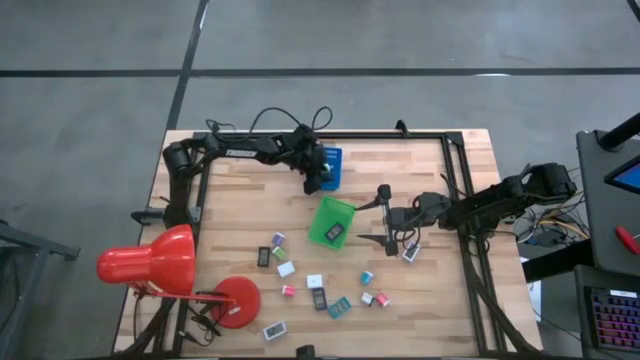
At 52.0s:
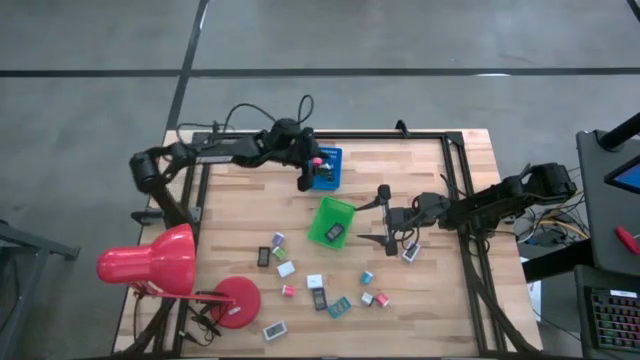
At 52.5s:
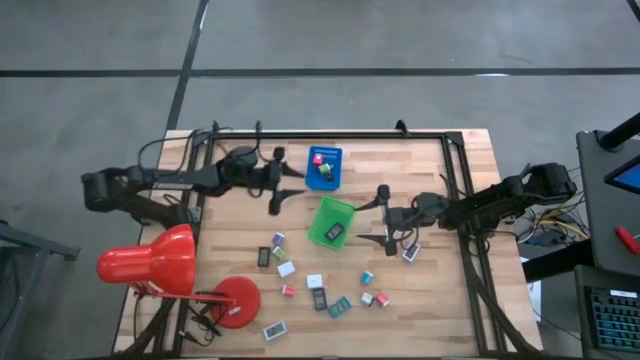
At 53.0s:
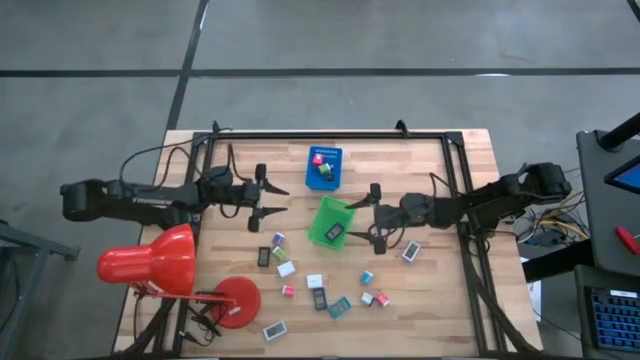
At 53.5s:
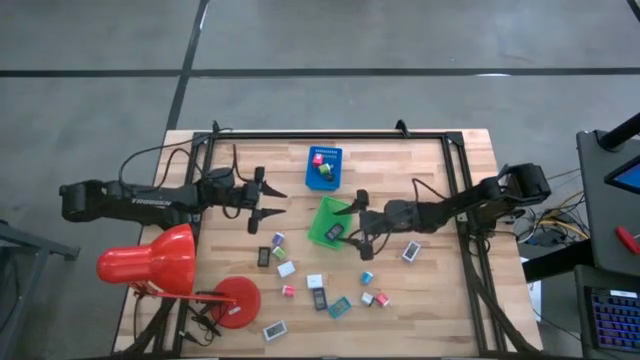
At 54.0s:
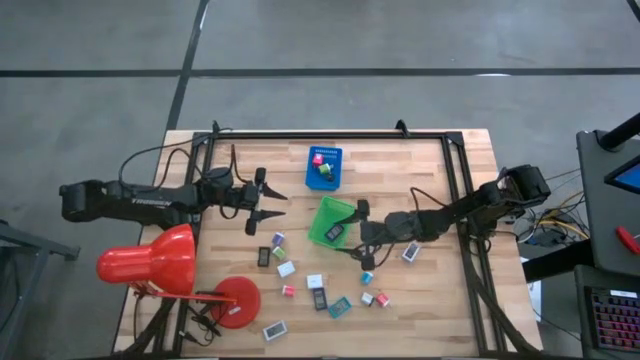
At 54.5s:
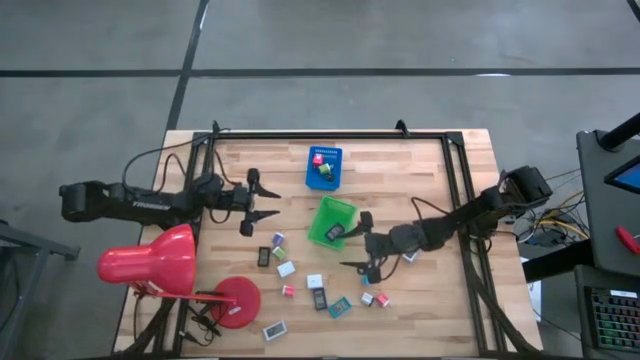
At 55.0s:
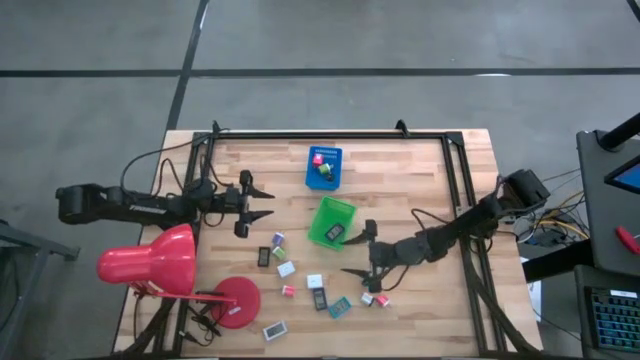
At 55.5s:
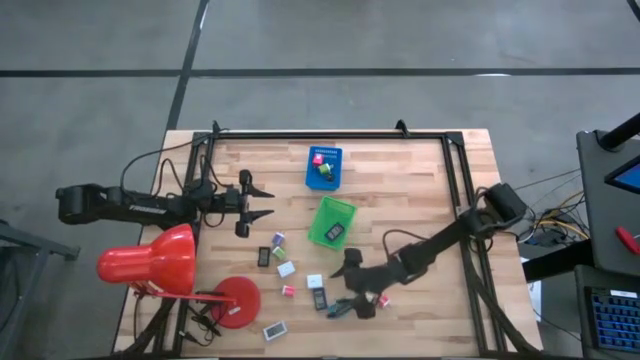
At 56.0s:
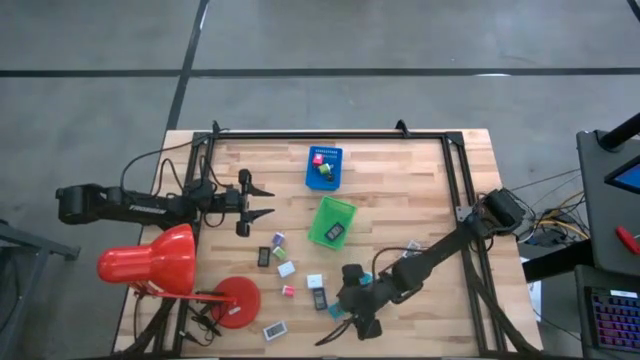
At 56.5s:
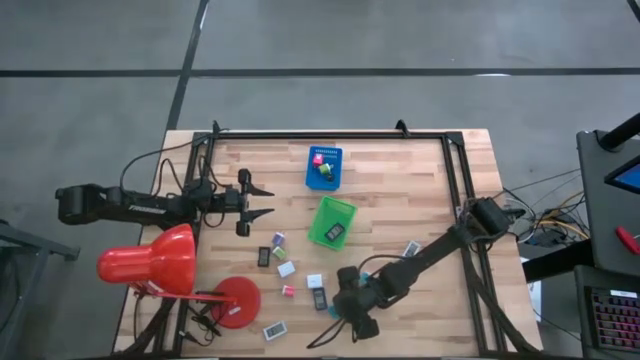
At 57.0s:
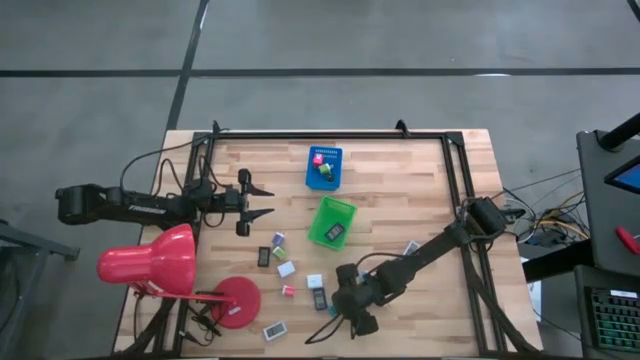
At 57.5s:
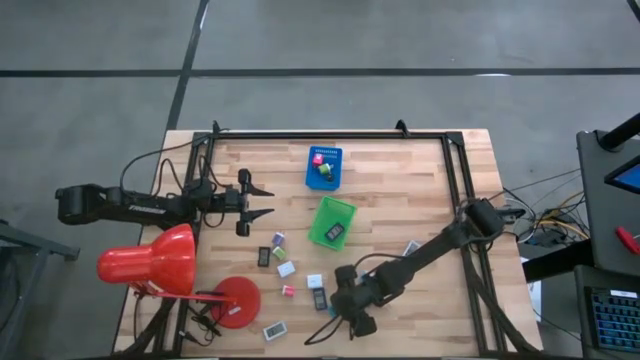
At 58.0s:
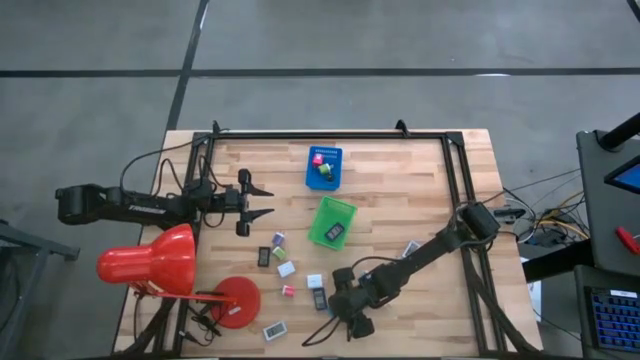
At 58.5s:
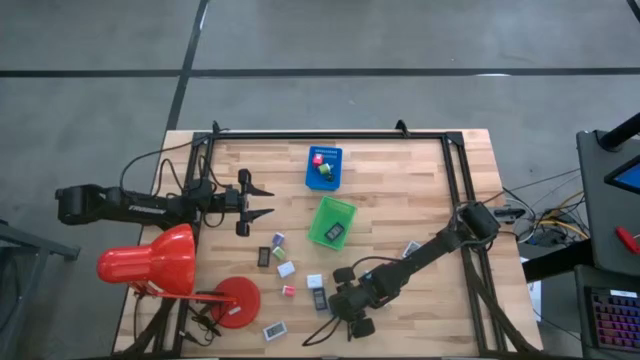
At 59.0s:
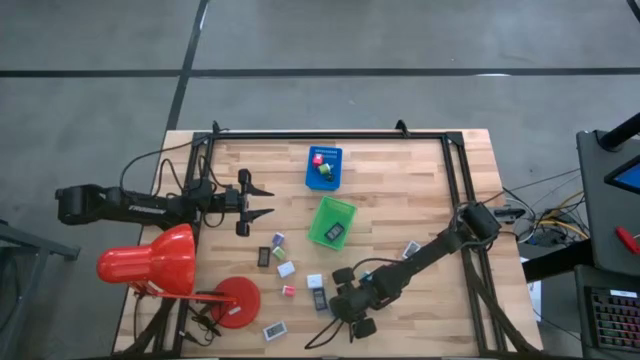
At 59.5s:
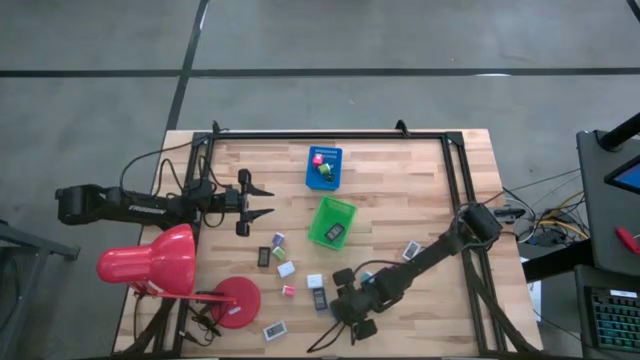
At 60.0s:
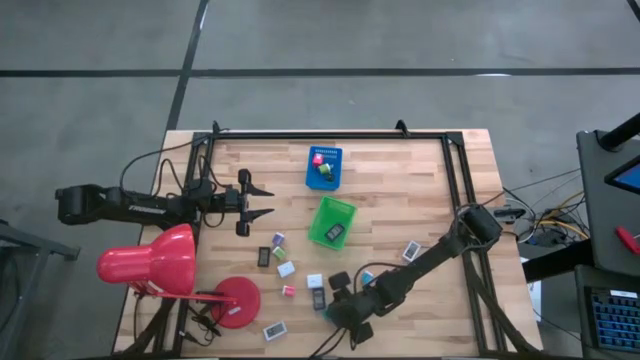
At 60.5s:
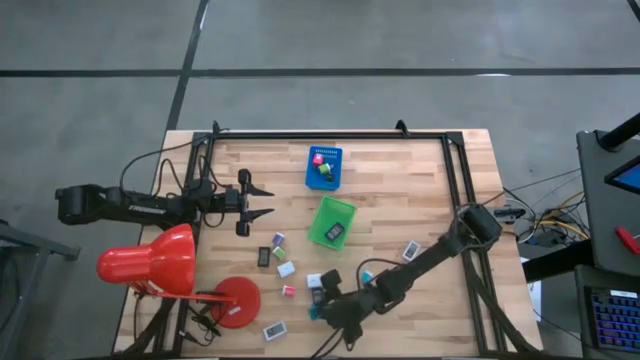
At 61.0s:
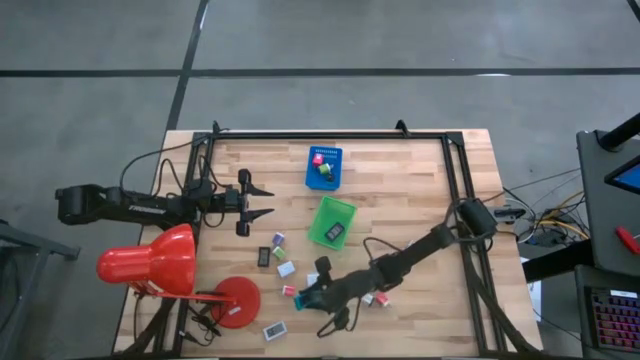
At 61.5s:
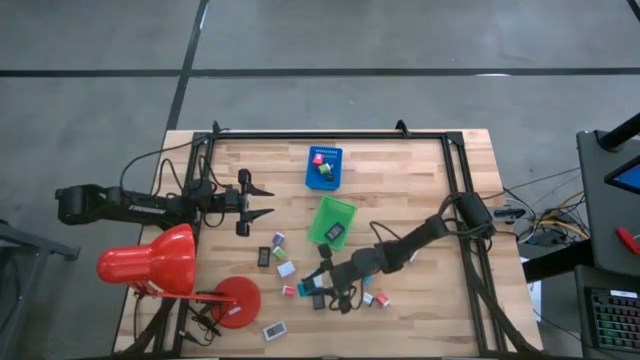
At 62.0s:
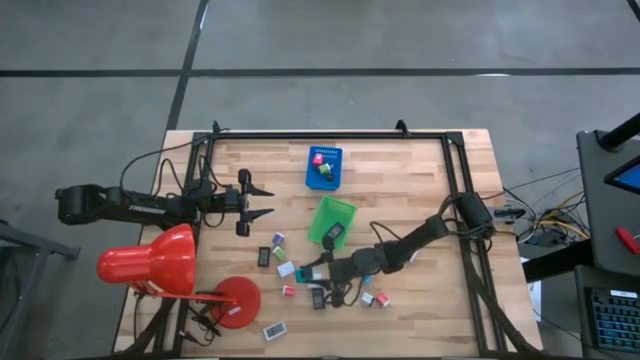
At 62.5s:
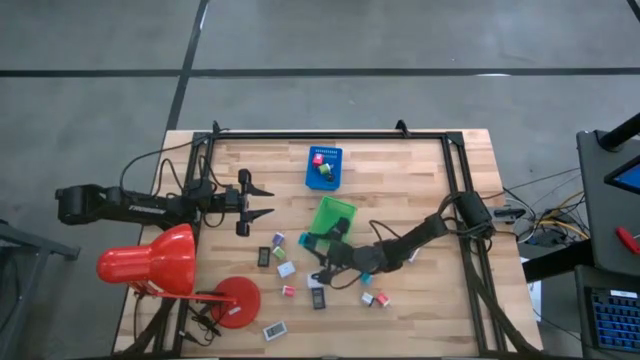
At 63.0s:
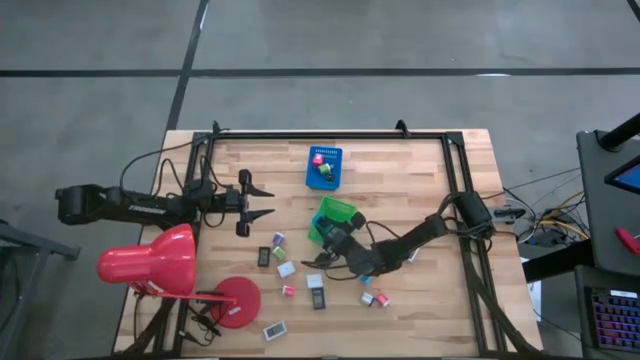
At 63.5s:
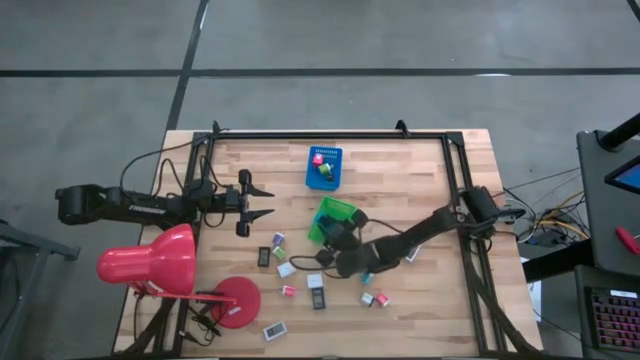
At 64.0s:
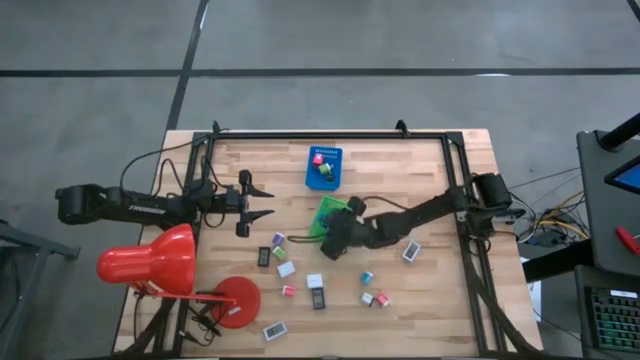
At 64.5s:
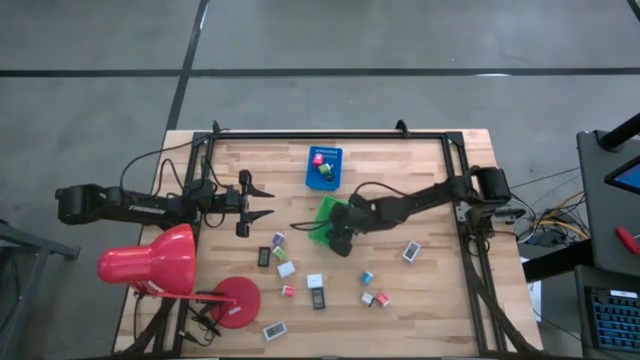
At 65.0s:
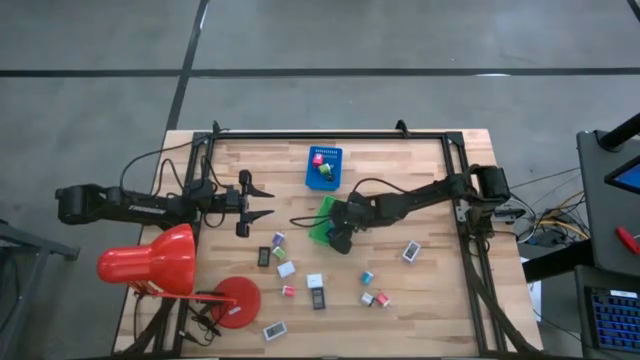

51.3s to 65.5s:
Task: Pick & Place Office items
Put the light blue digital clock into the green bin

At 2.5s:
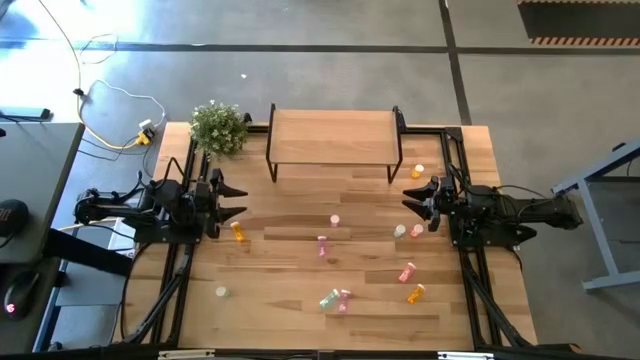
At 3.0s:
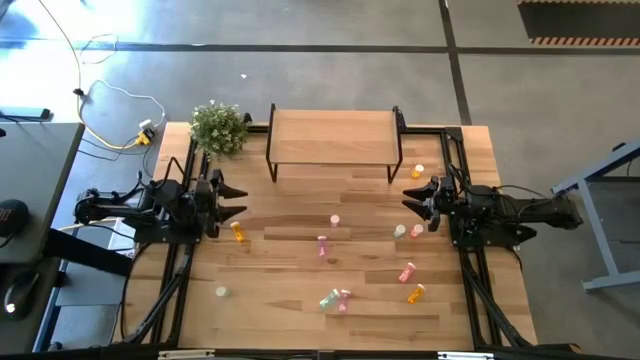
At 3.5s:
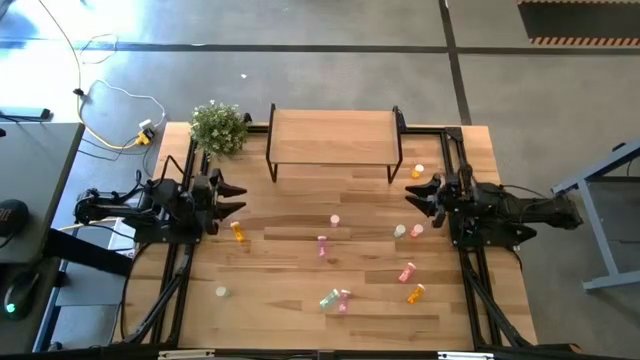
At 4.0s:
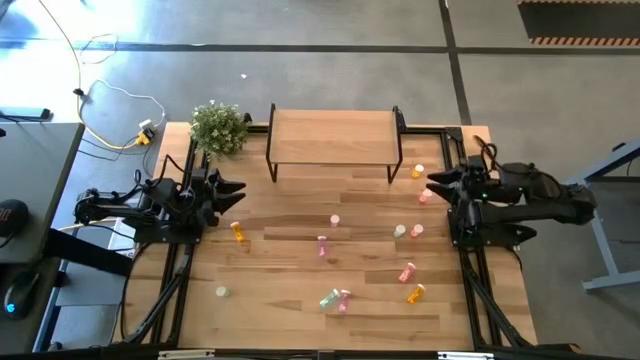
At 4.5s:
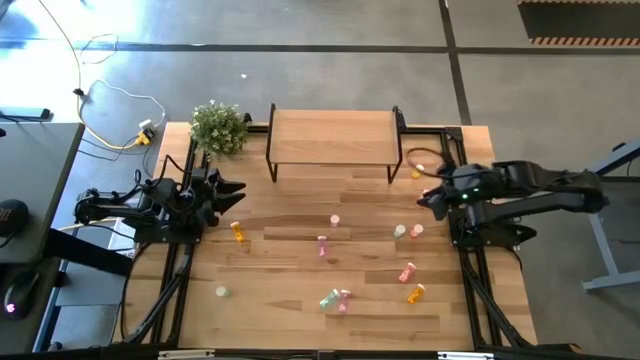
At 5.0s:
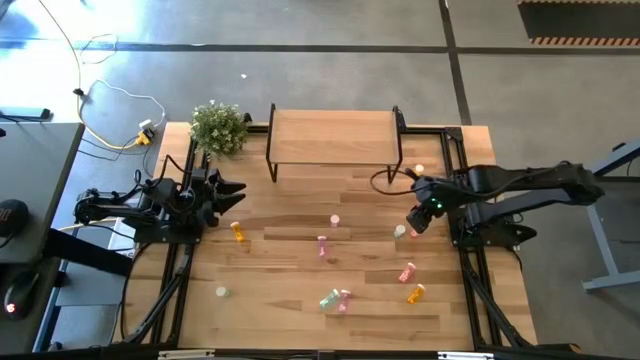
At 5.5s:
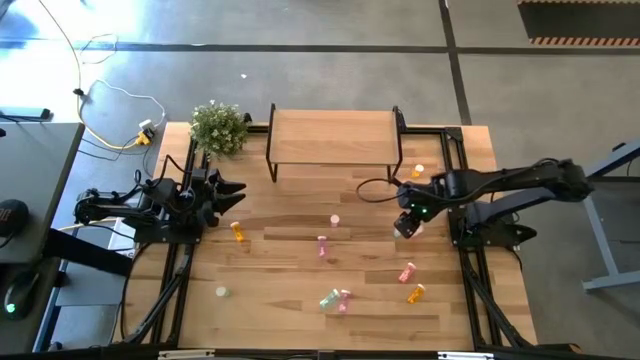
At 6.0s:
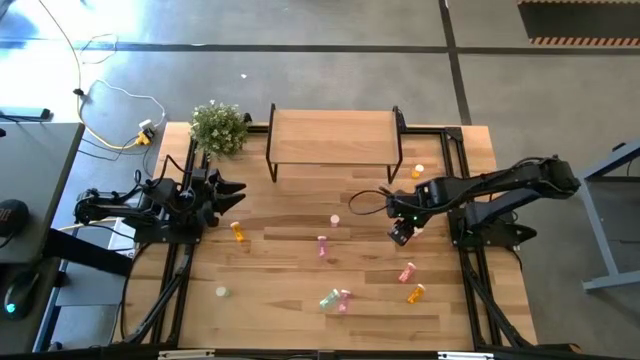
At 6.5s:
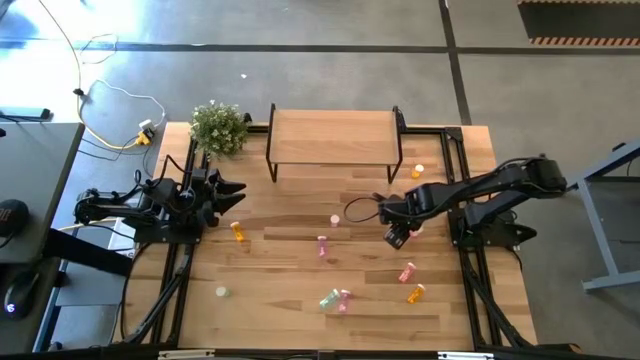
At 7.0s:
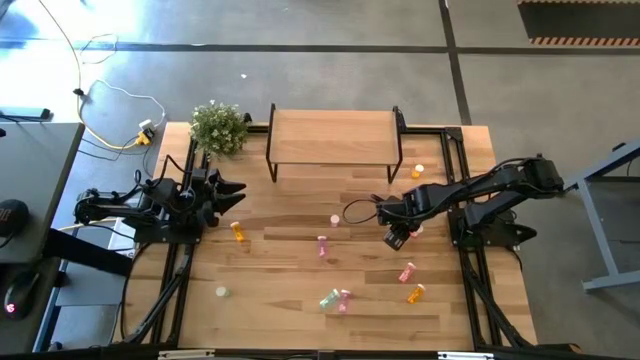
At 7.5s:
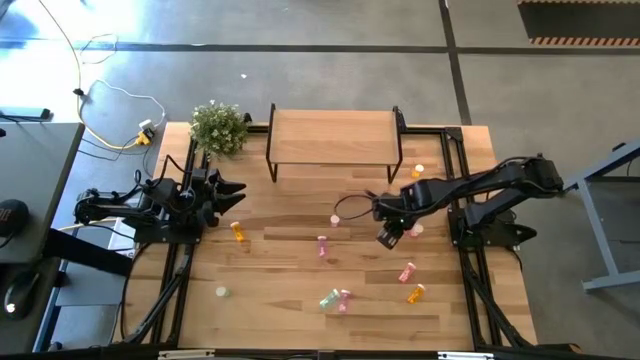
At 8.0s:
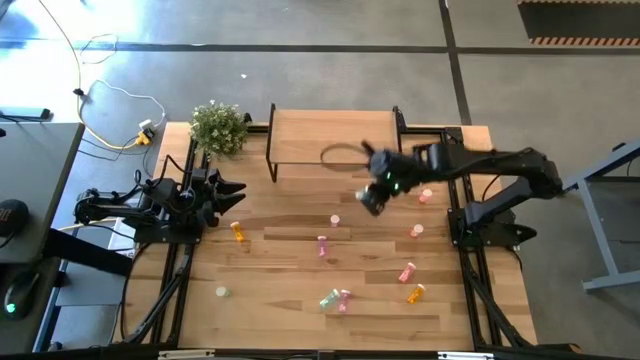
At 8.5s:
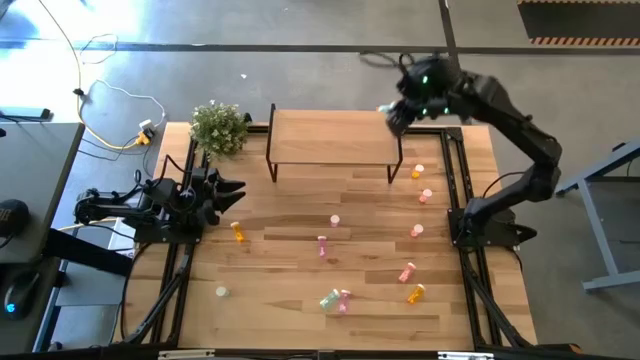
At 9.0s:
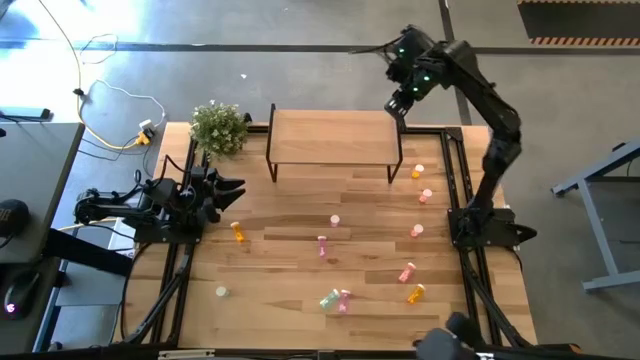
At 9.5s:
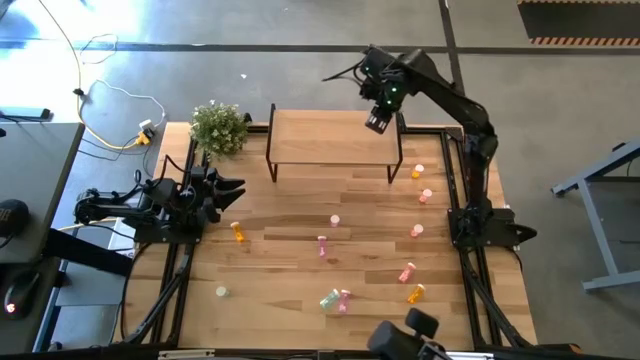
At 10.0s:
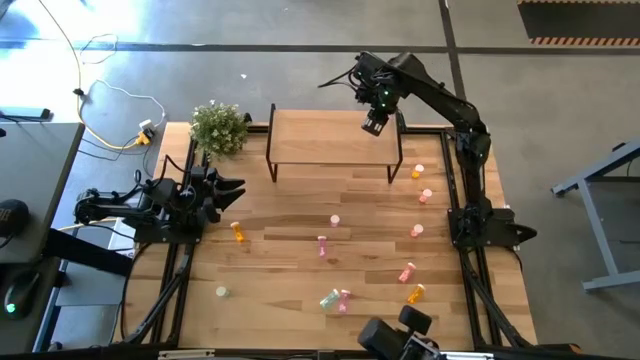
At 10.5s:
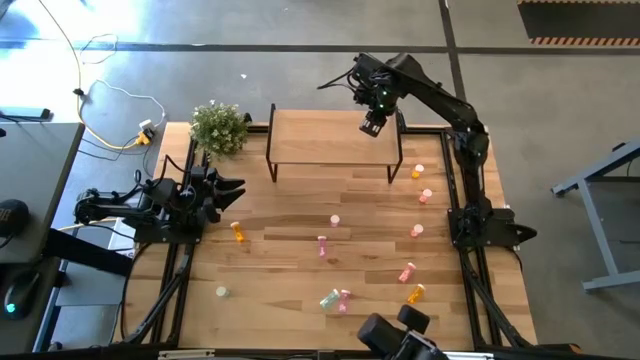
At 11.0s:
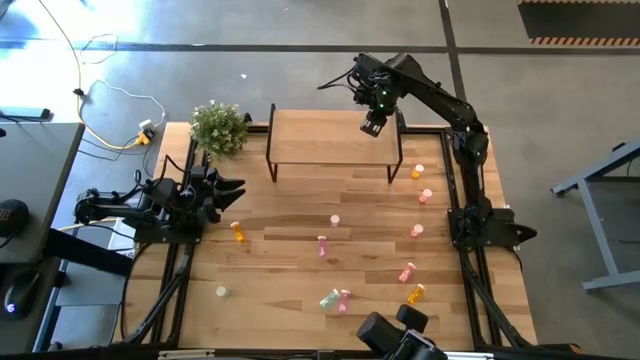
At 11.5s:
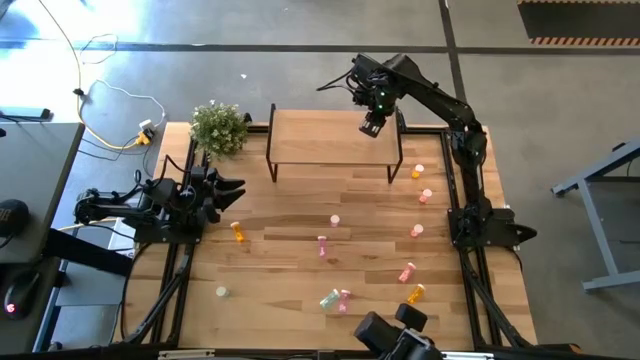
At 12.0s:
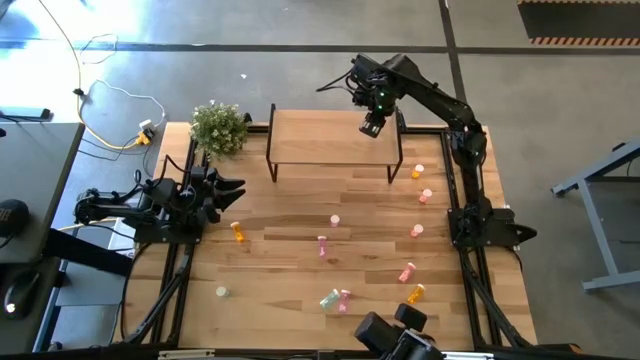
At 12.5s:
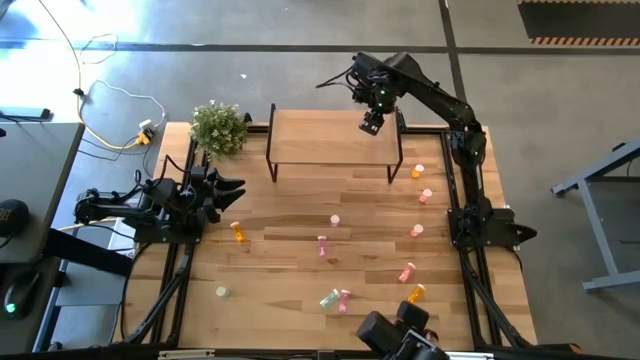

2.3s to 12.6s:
Task: Pick and place medicine bottles onto shelf by color
Put the top blue pill bottle on the shelf
